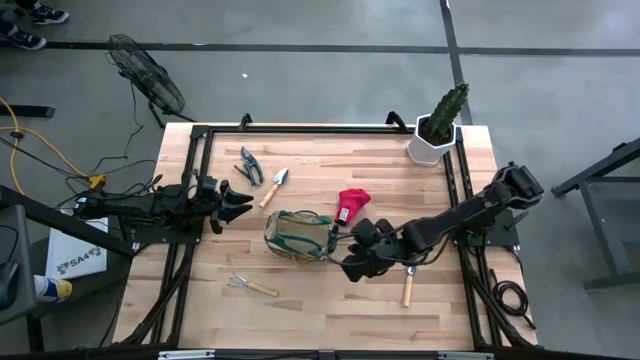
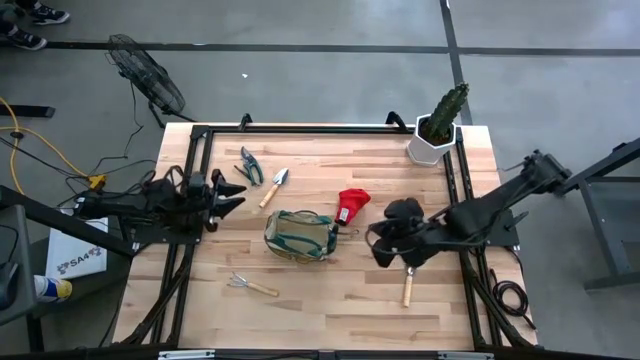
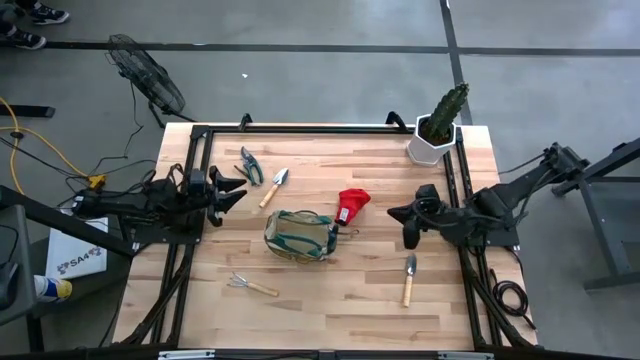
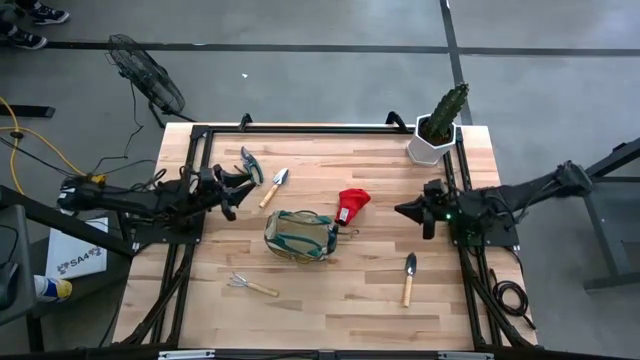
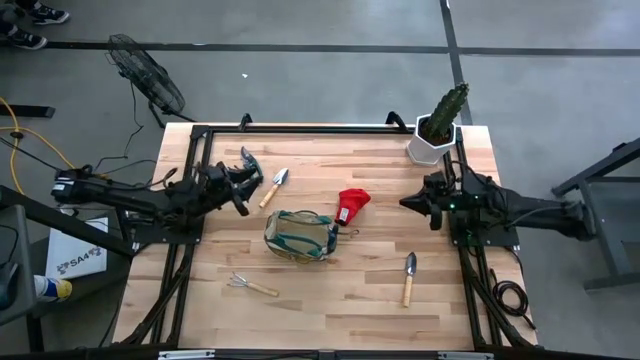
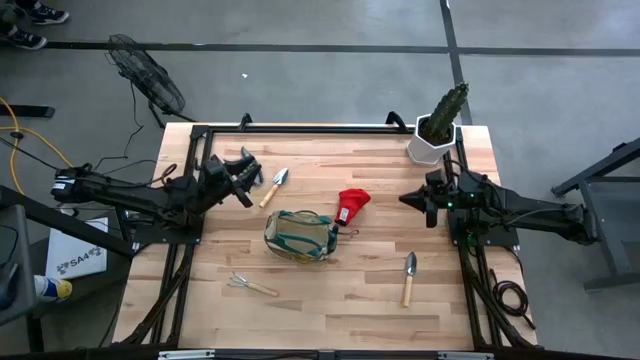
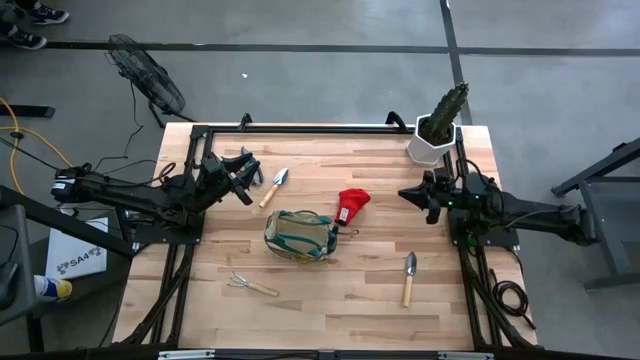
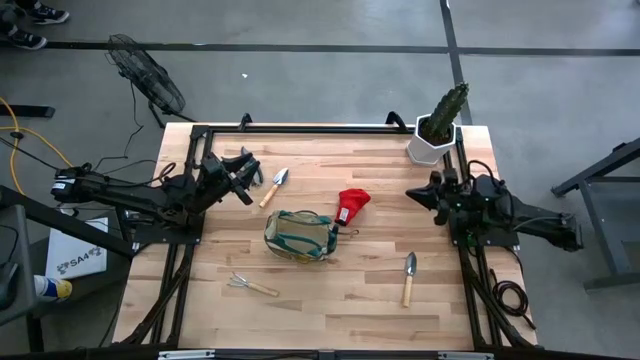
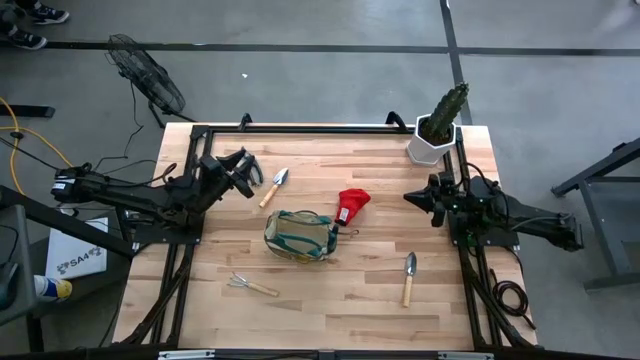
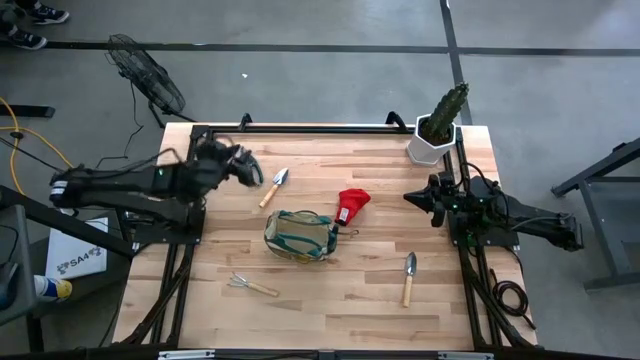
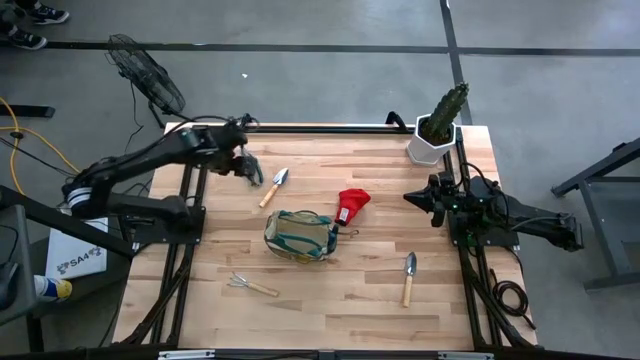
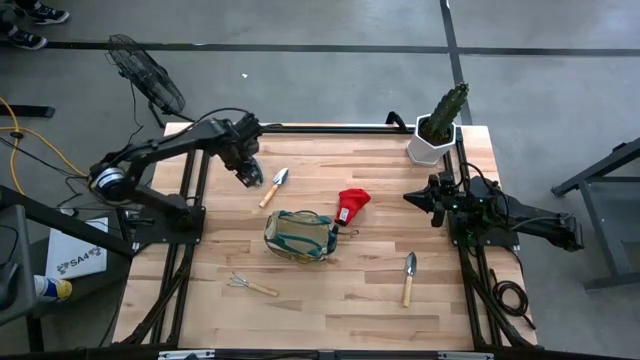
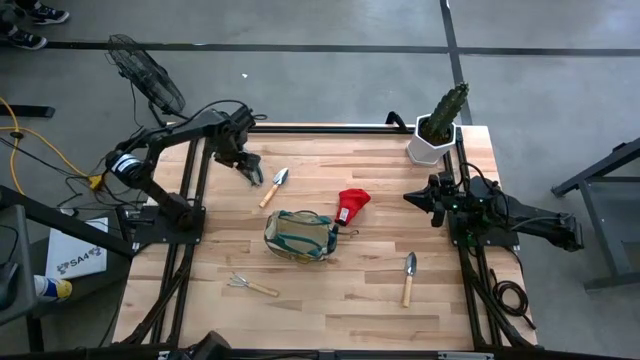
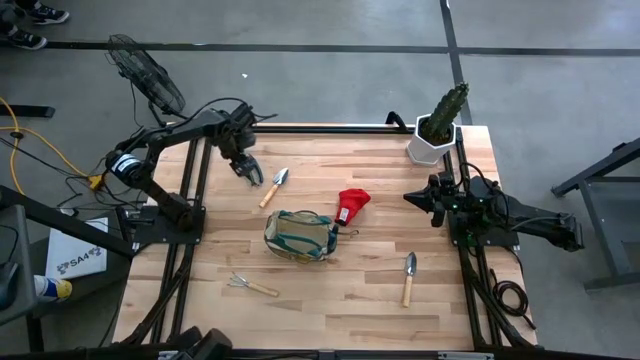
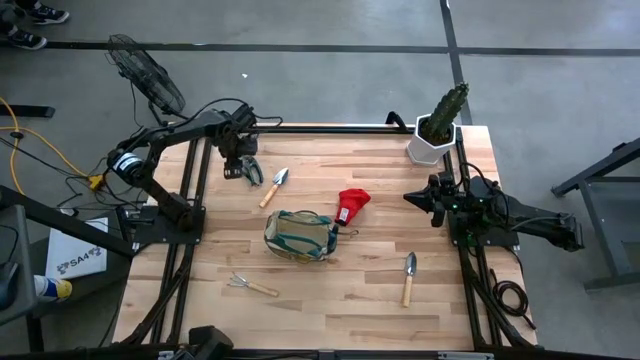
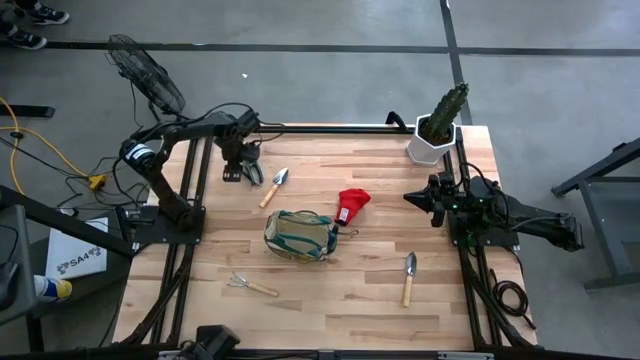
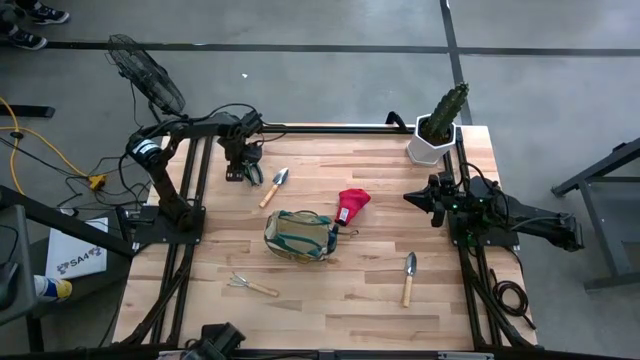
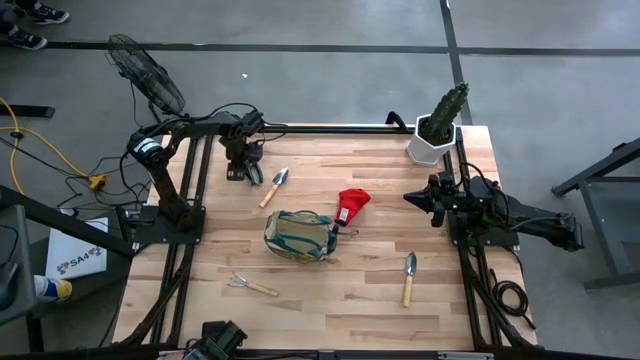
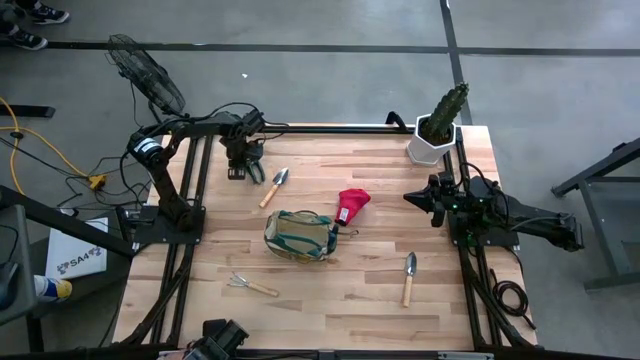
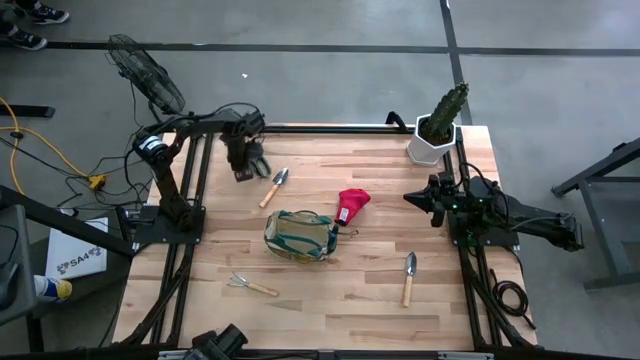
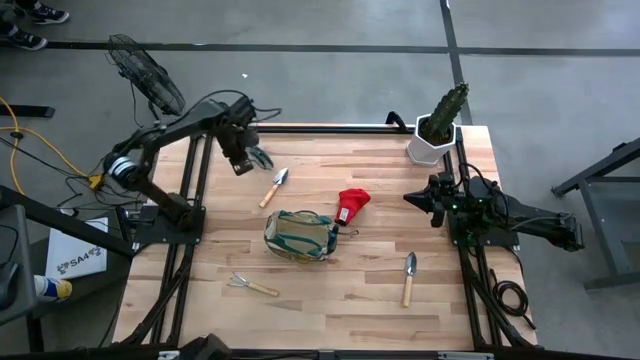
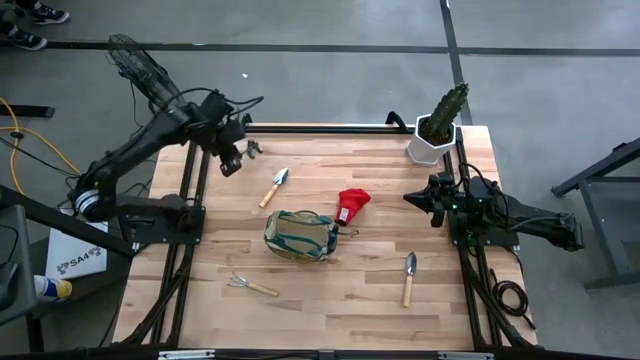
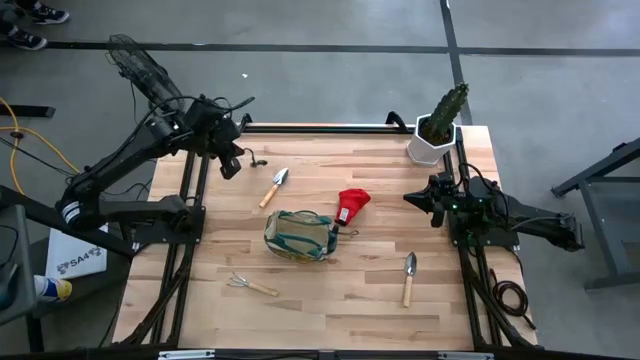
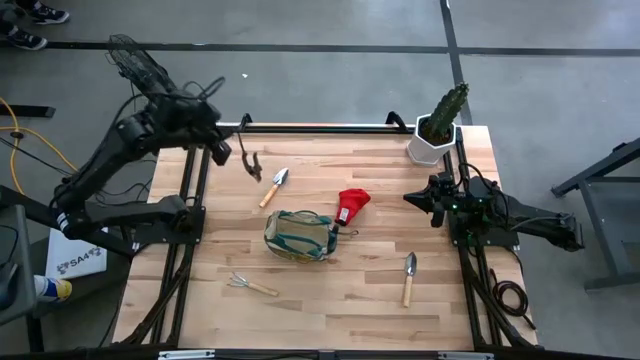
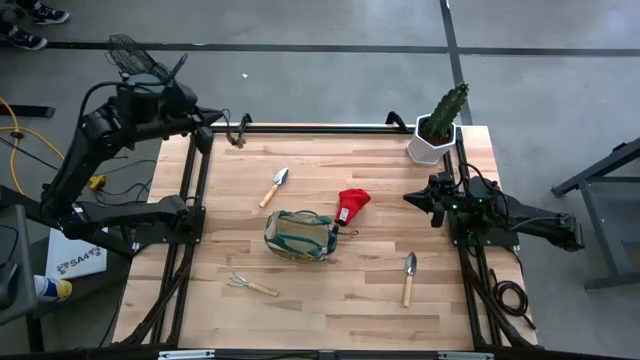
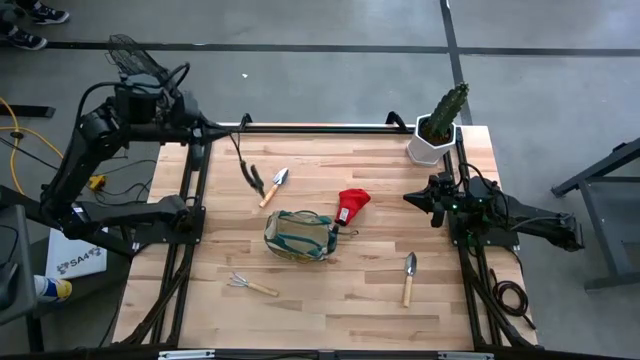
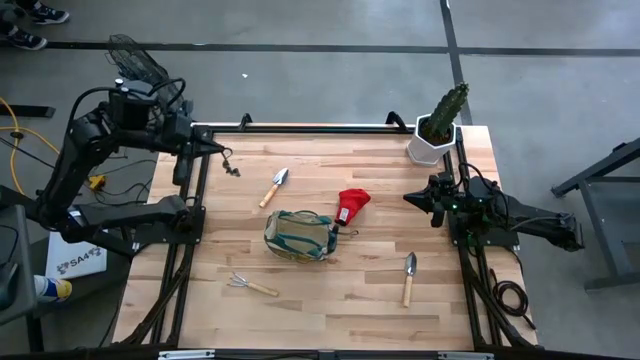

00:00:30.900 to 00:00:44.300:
Task: Pick & Place Garden tools in Gardening bag
Put the shear green scissors into the gardening bag

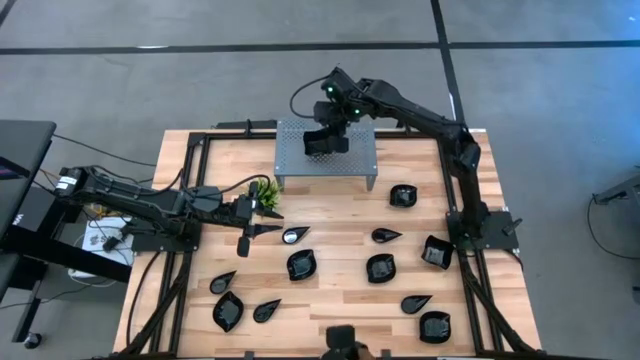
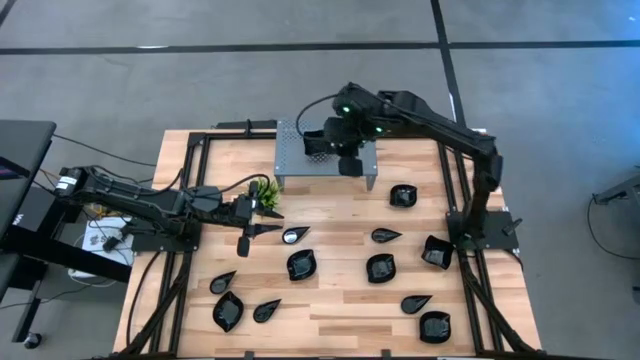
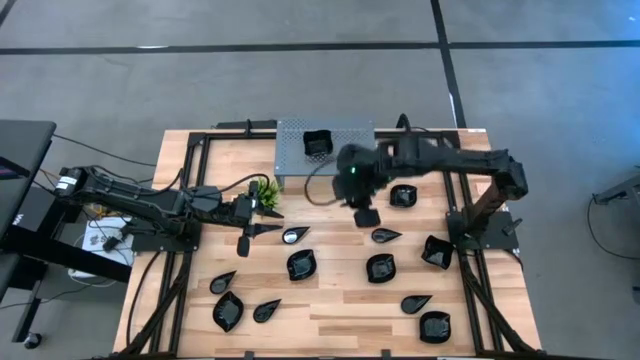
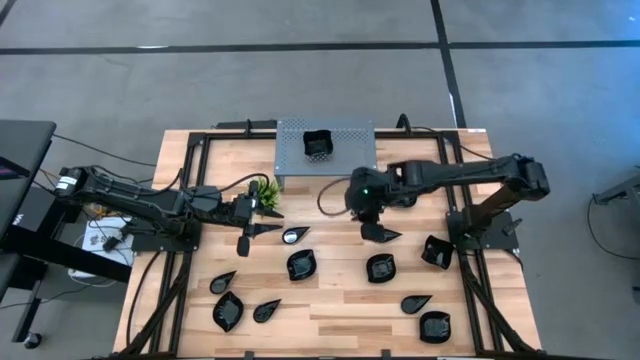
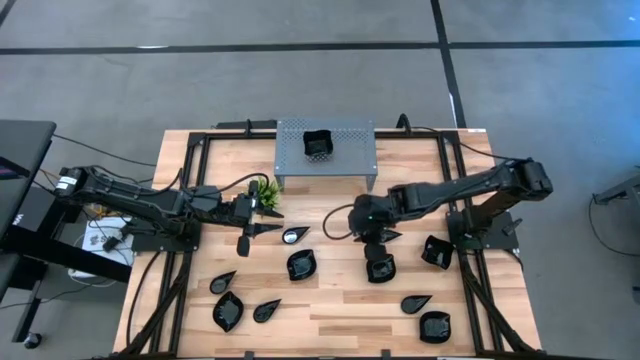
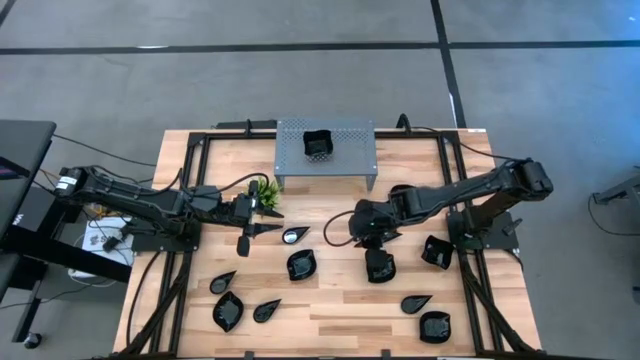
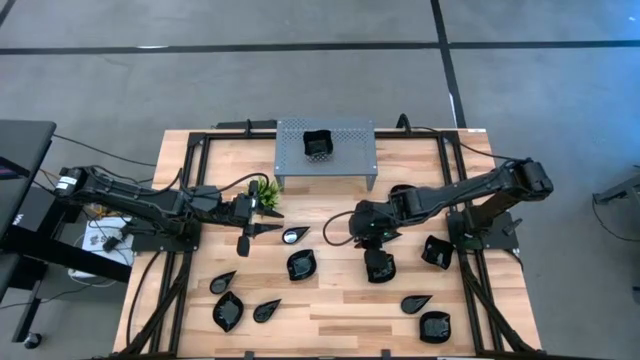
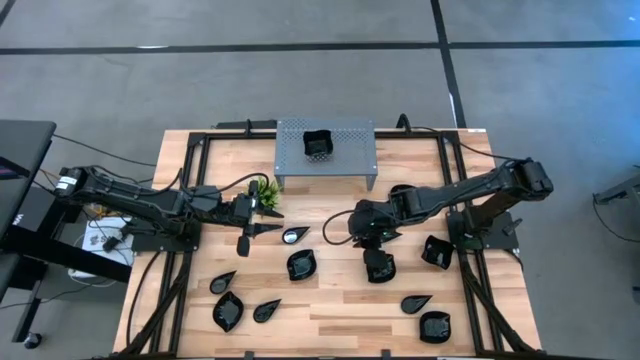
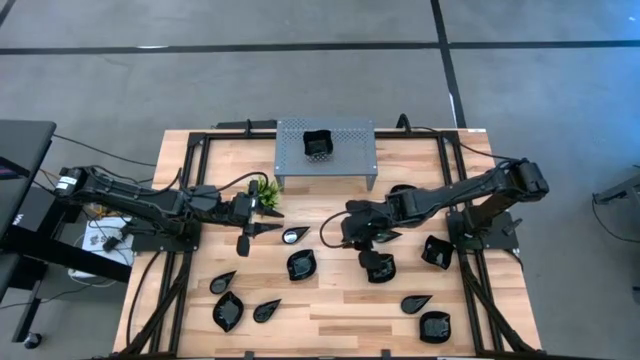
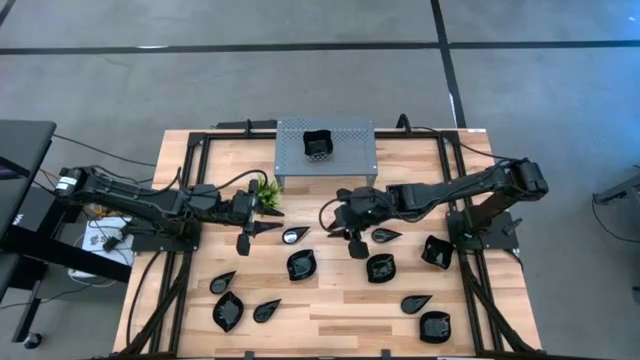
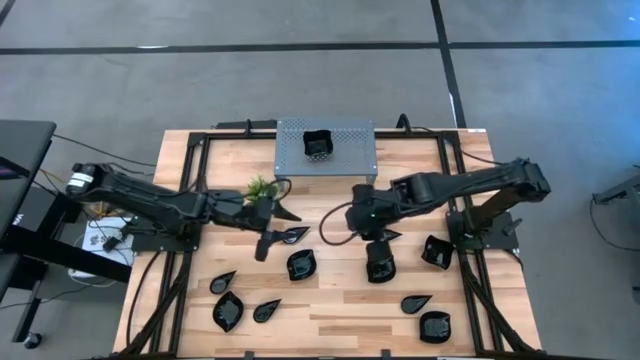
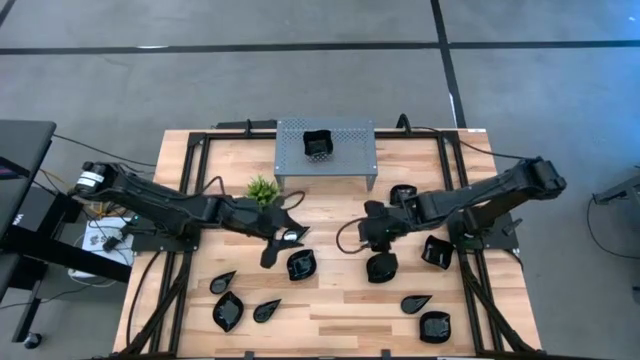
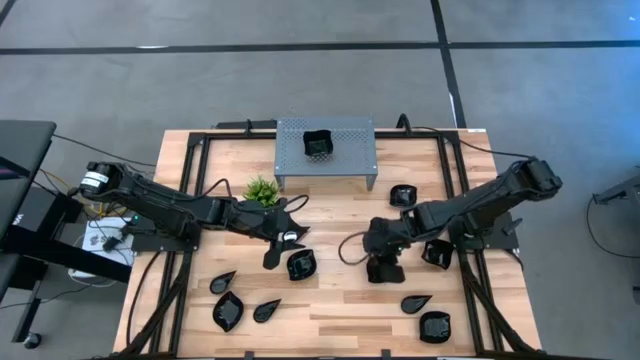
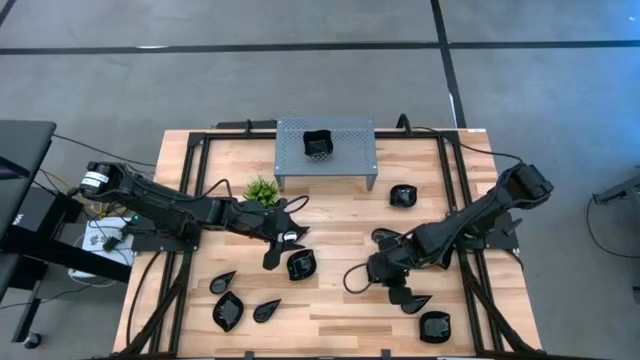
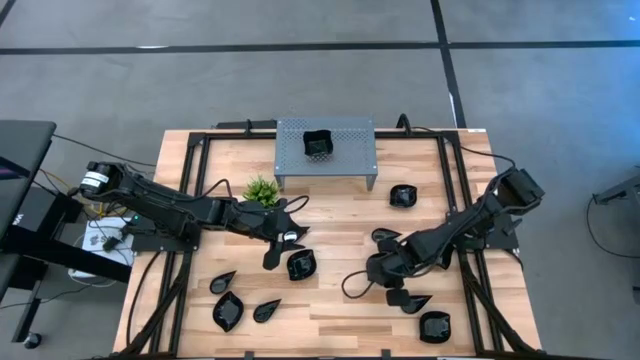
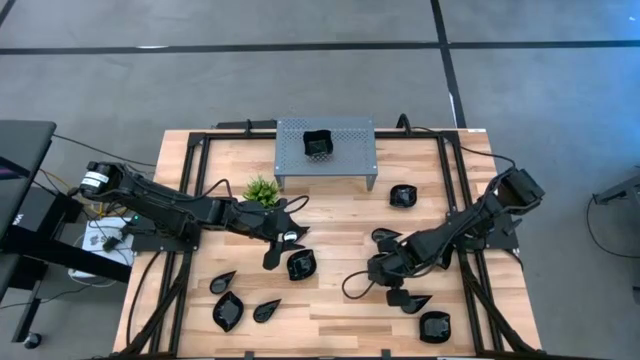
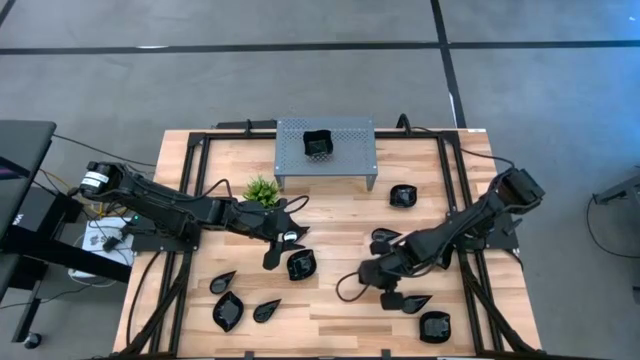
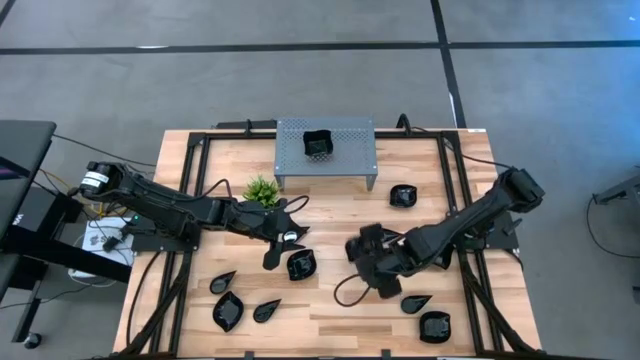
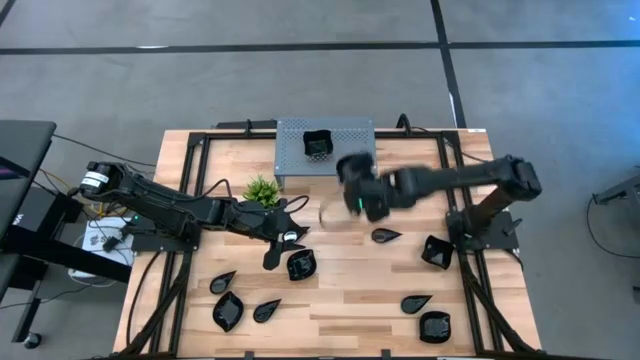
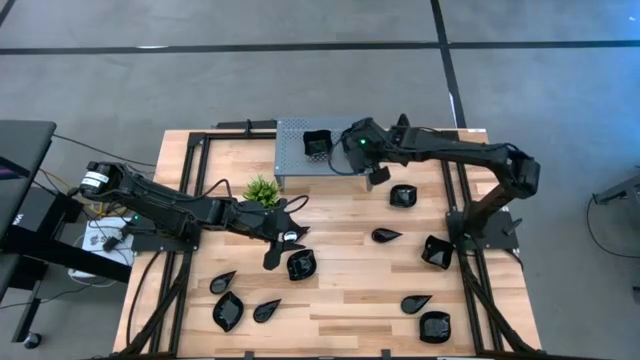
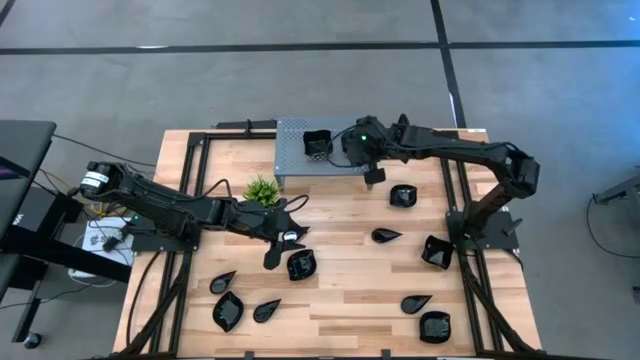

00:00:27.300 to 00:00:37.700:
Task: Pick & Place Mini shaped plates
Put the black leaf-shaped plate on the shelf
